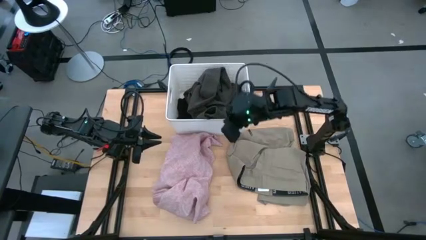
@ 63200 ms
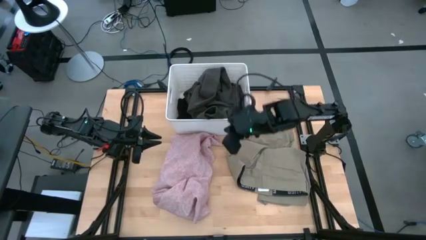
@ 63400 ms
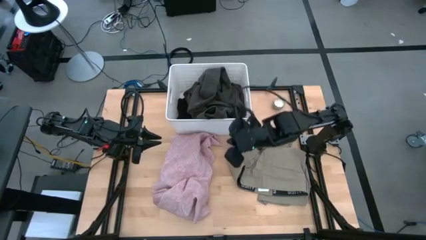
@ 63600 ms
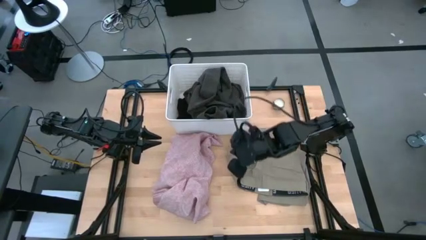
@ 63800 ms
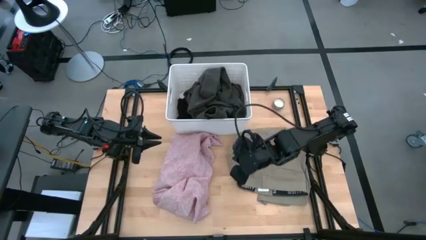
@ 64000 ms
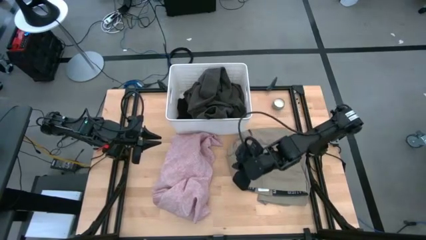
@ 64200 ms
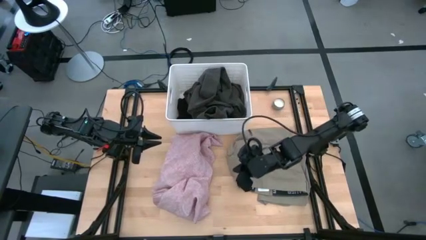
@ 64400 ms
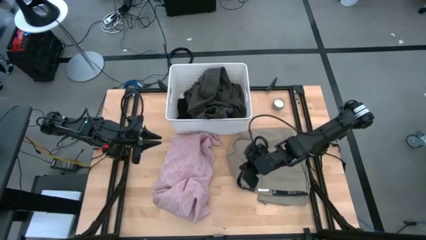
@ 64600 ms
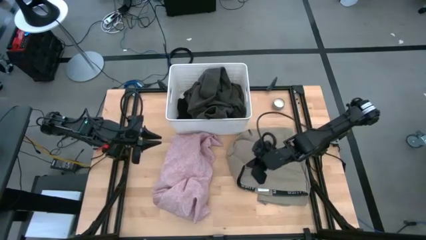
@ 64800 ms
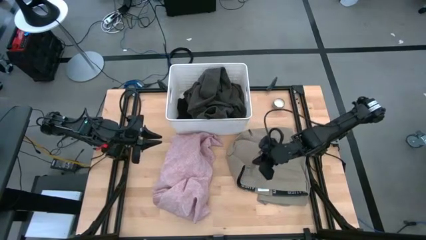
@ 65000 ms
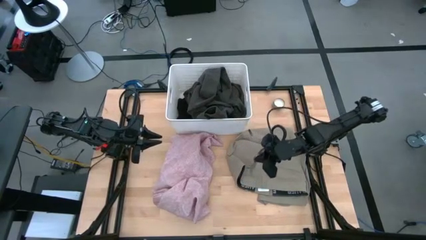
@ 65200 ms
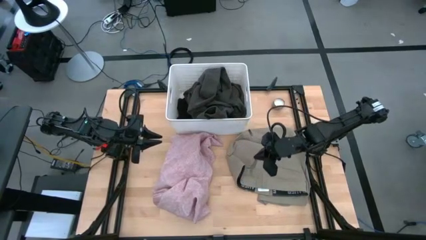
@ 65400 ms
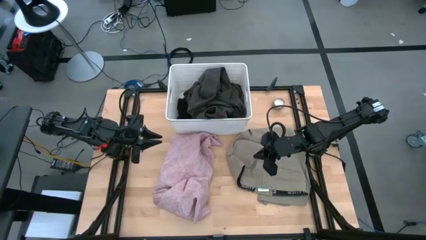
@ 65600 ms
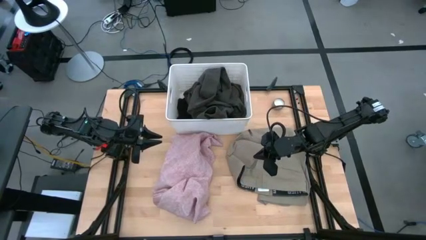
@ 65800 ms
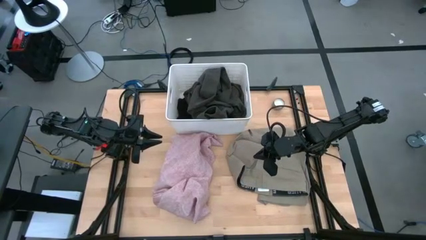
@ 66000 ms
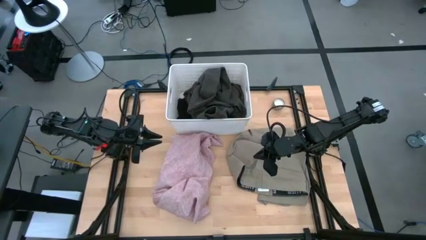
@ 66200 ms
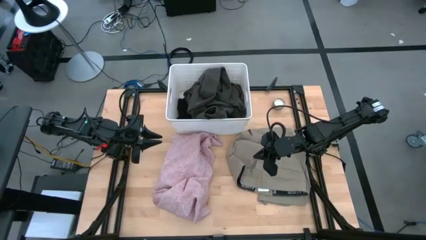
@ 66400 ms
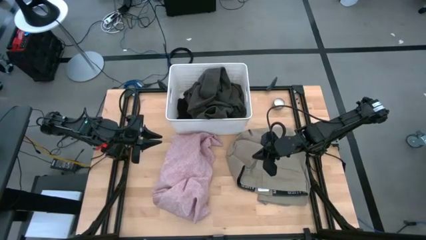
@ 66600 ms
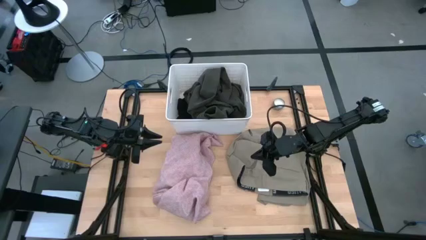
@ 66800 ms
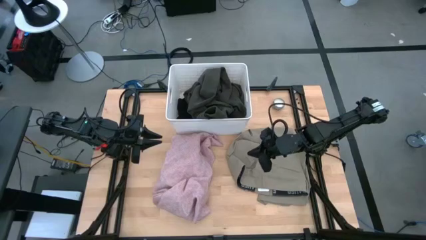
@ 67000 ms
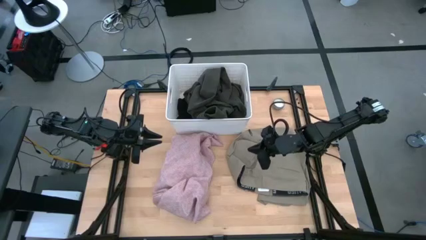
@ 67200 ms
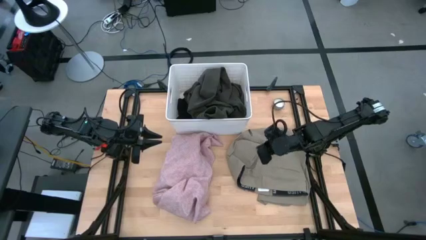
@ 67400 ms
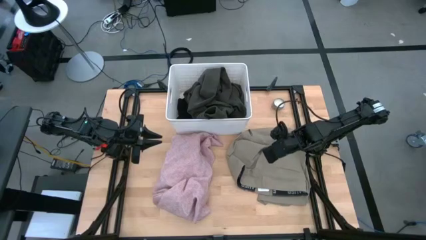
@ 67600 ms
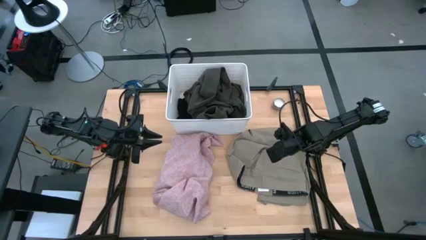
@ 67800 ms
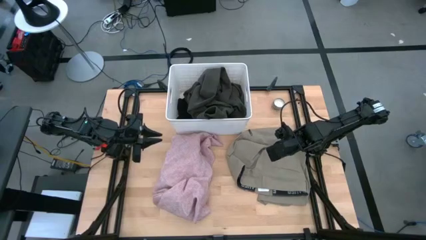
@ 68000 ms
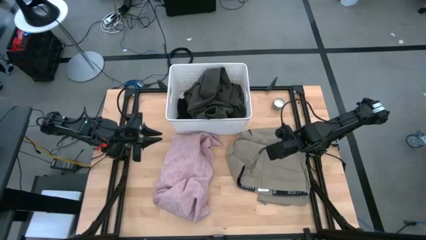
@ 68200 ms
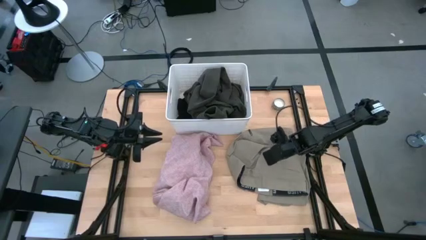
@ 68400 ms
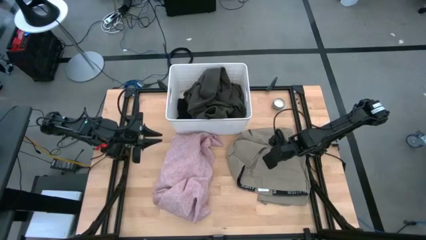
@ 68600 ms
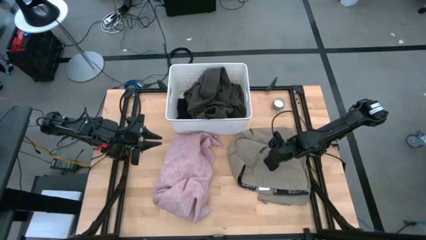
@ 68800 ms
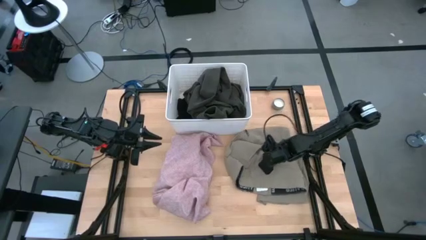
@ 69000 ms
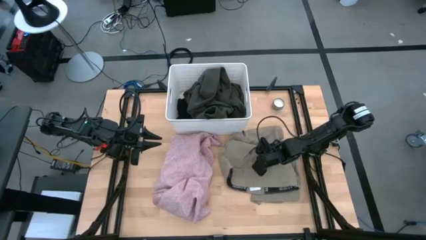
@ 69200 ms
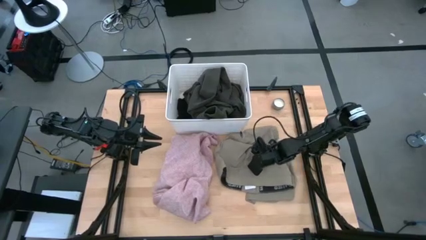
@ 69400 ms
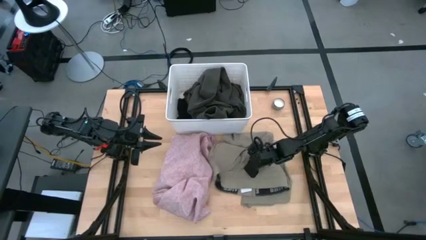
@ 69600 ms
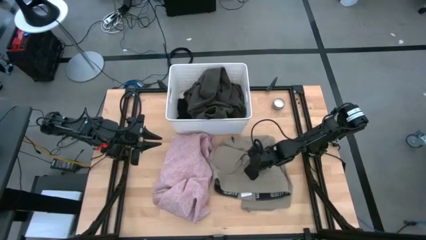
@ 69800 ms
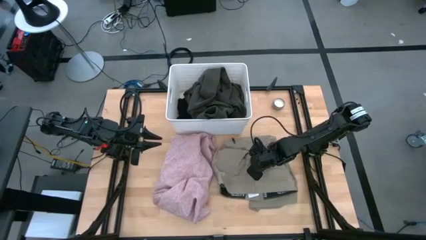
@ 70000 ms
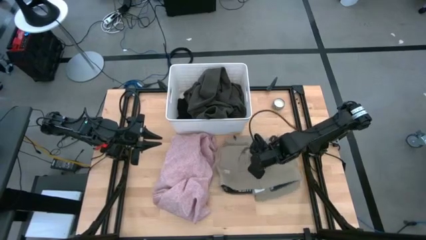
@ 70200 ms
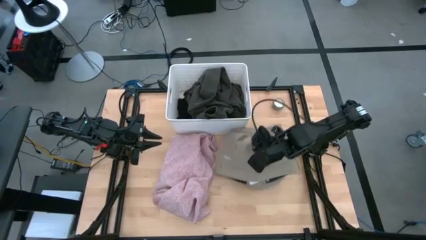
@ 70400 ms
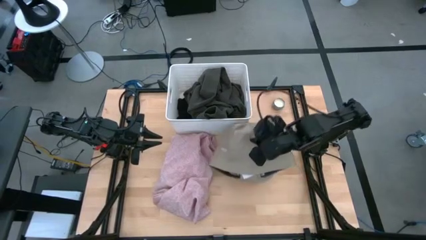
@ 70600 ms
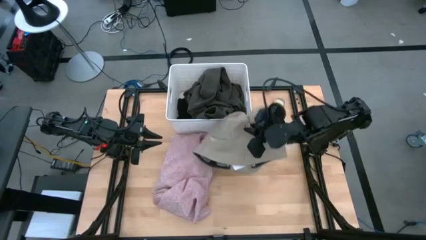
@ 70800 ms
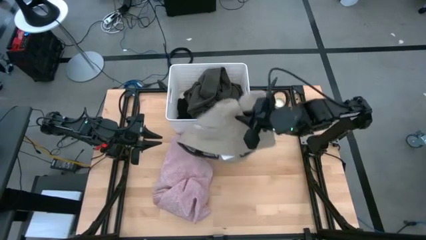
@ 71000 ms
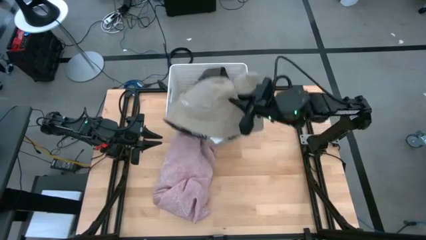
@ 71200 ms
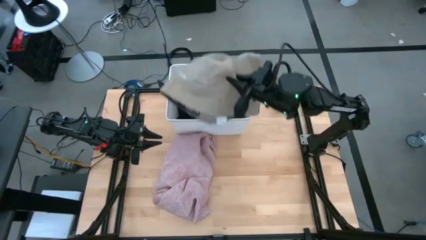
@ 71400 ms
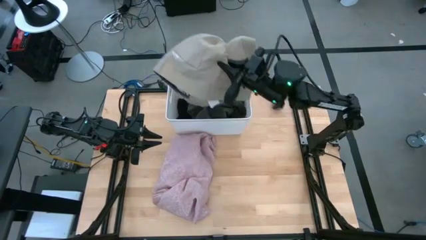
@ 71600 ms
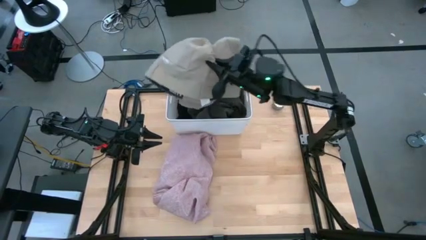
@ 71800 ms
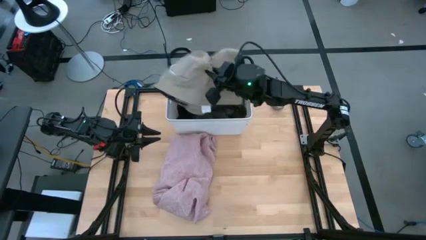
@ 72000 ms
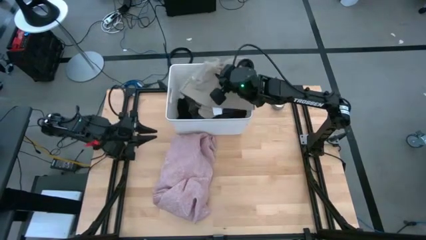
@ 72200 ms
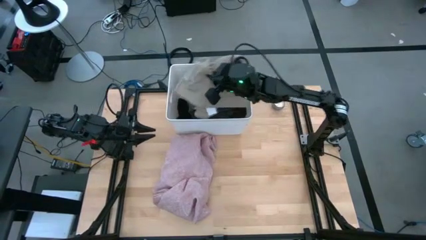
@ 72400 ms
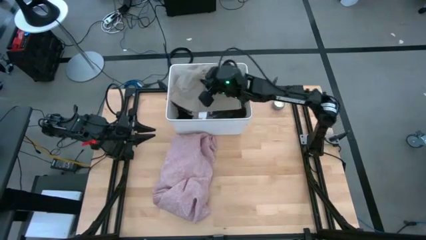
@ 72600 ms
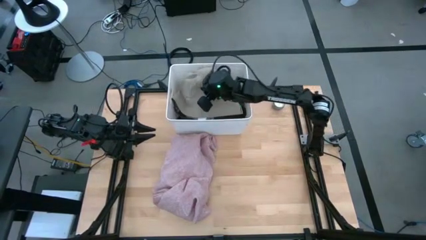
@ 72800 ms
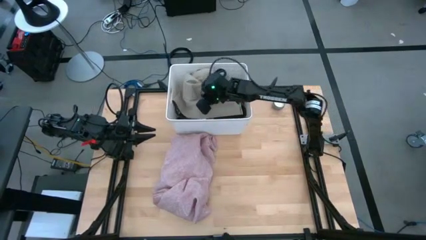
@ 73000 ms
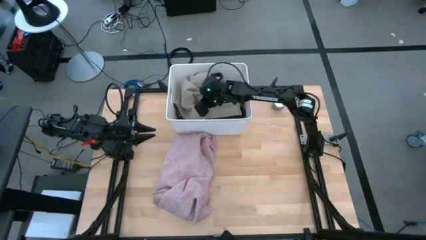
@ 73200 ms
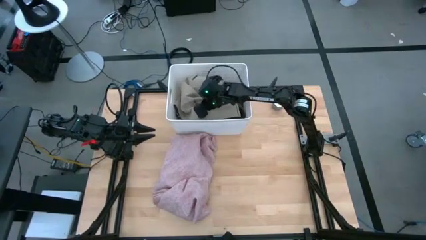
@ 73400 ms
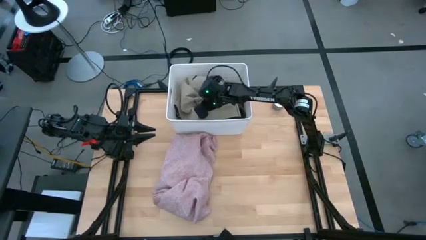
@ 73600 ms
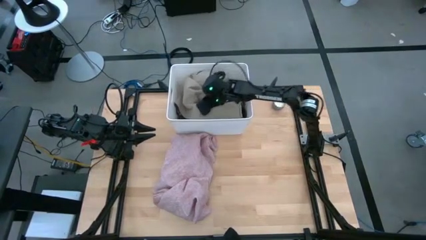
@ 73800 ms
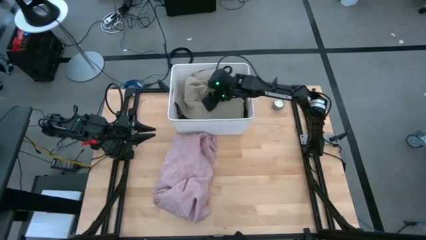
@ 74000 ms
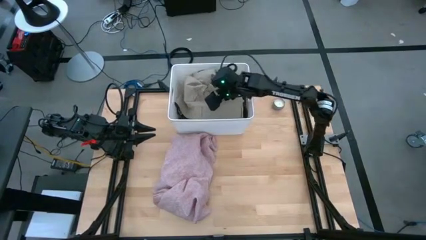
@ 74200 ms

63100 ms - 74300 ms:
Task: Sort clothes
Put the brown shorts into the white laundry organizer

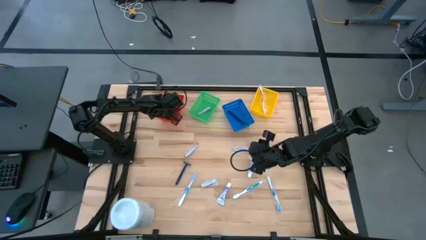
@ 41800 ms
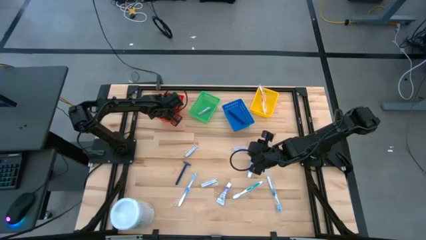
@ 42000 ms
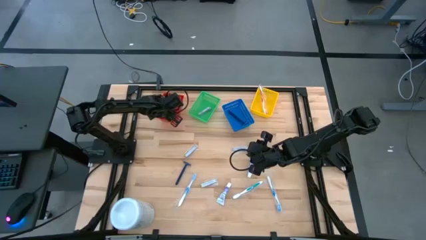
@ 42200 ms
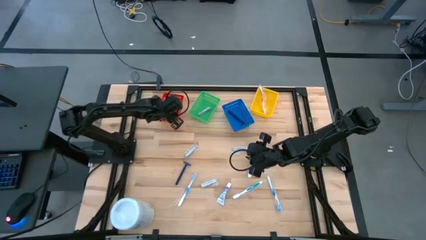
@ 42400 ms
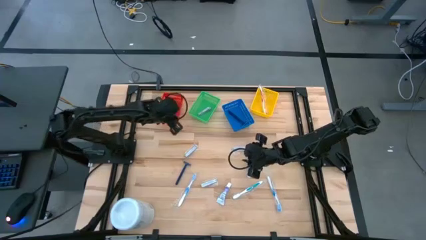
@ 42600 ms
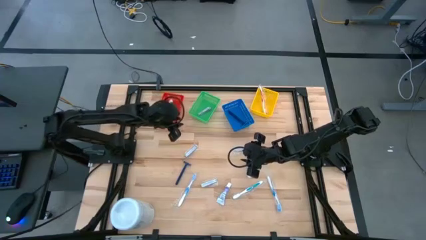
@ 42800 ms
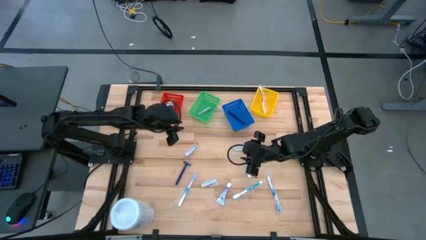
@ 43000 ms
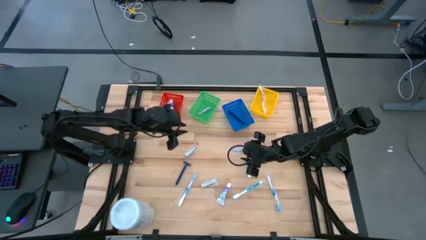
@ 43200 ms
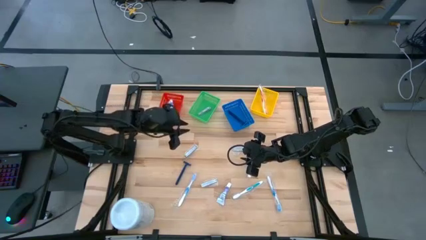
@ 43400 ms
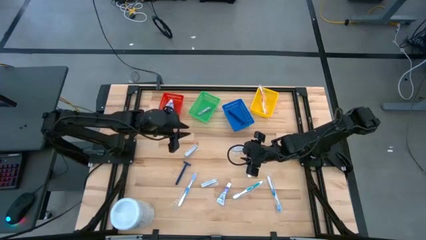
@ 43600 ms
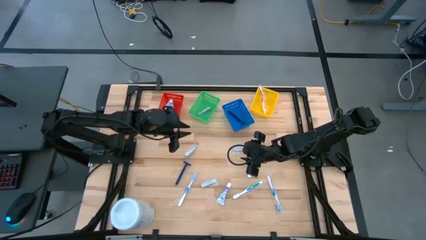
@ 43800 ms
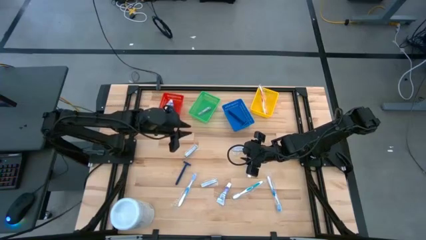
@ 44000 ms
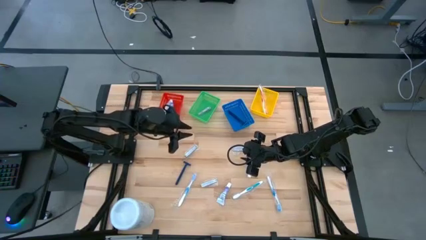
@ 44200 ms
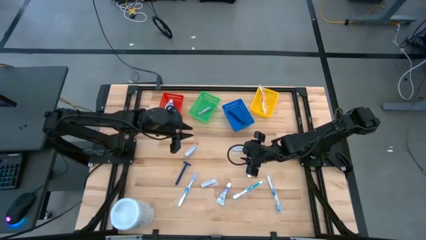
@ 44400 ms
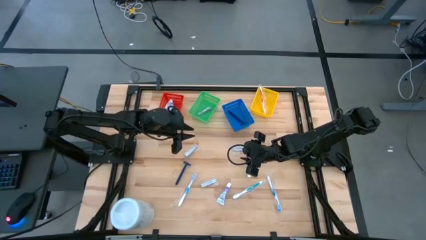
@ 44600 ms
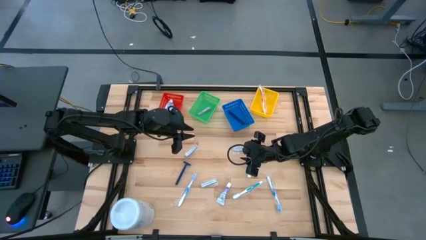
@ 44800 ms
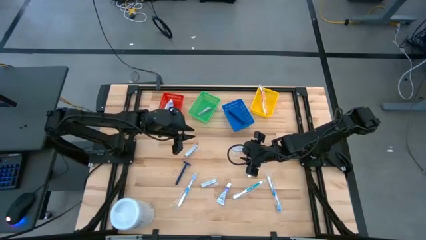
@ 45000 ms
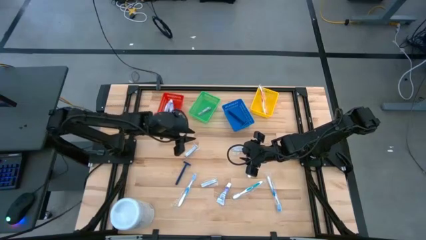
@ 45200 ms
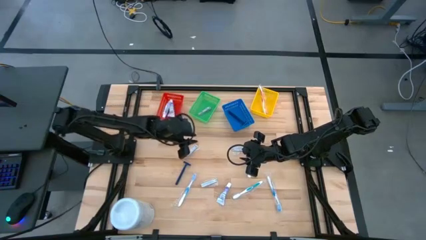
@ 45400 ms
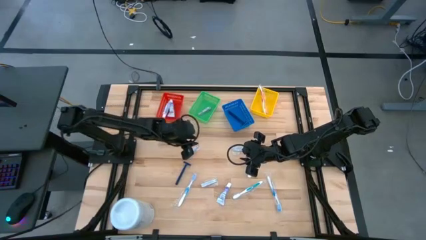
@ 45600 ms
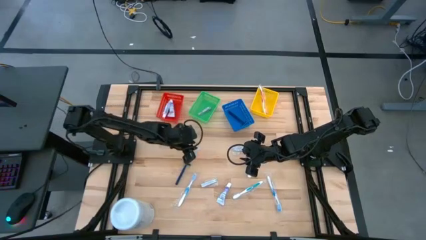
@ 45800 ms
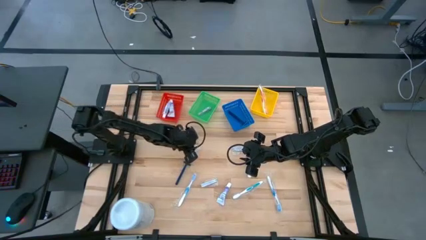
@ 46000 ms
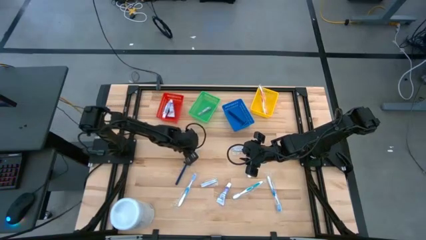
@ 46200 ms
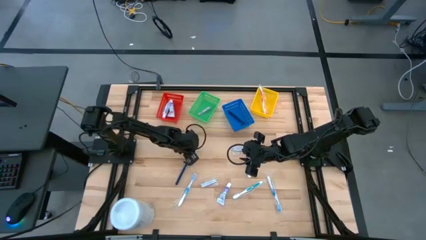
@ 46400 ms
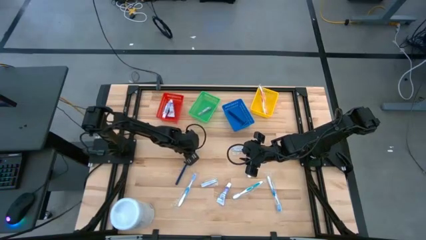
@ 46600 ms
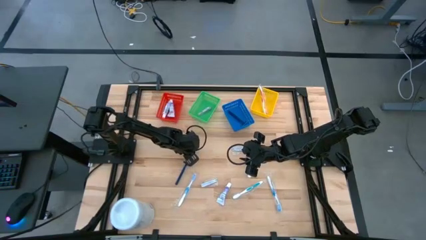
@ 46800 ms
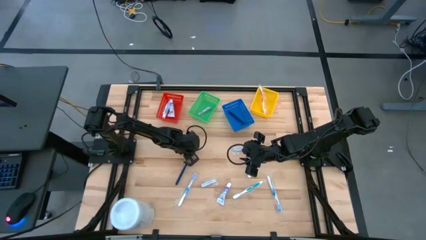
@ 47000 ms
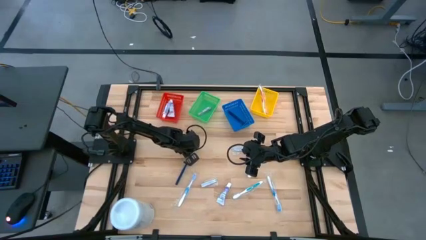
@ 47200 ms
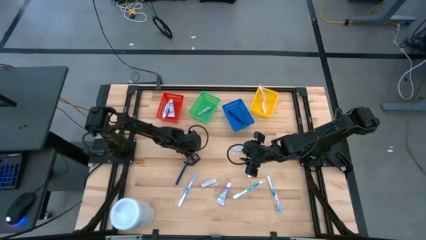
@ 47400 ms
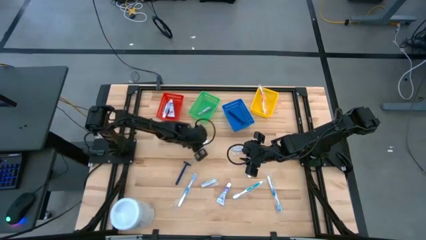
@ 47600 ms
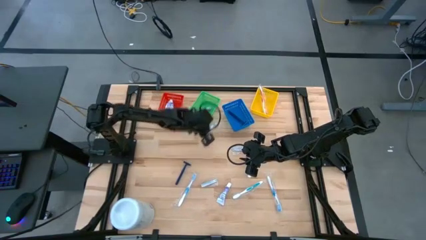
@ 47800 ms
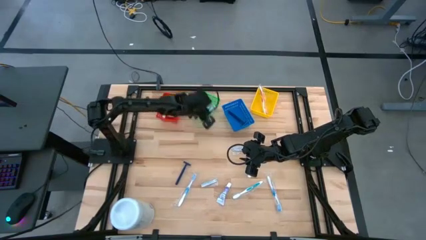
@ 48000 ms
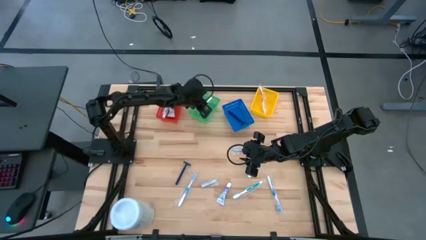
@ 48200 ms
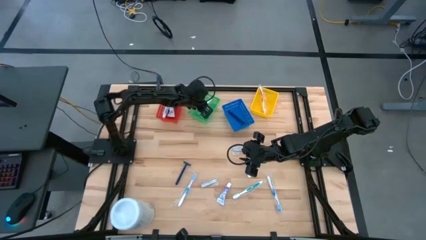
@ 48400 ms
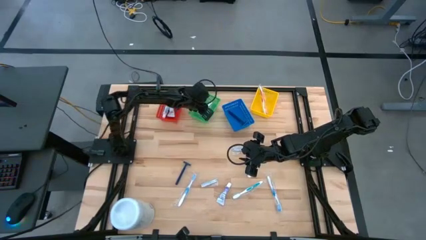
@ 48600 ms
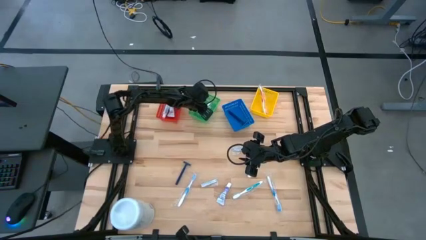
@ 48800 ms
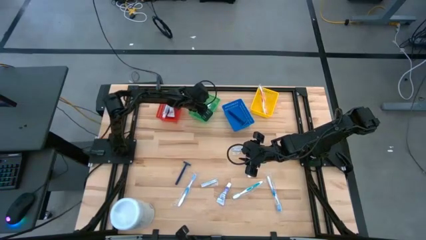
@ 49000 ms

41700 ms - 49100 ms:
Task: Pick & Place Travel size toiletries
Put the silver nail cutter in the green bin
